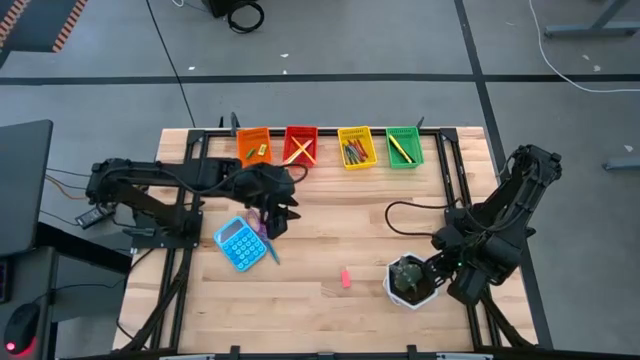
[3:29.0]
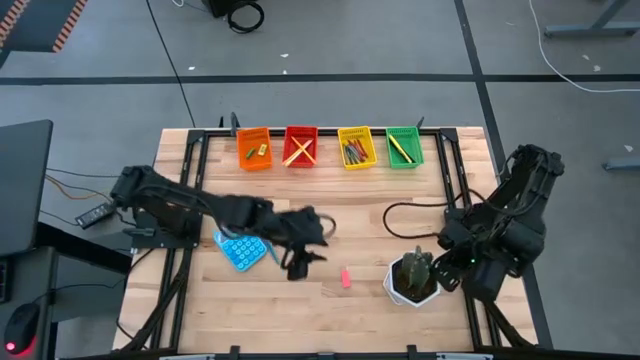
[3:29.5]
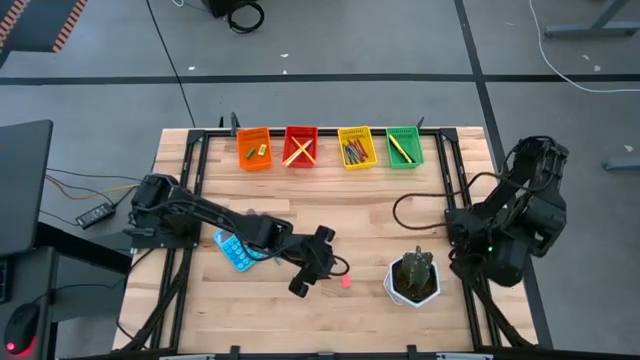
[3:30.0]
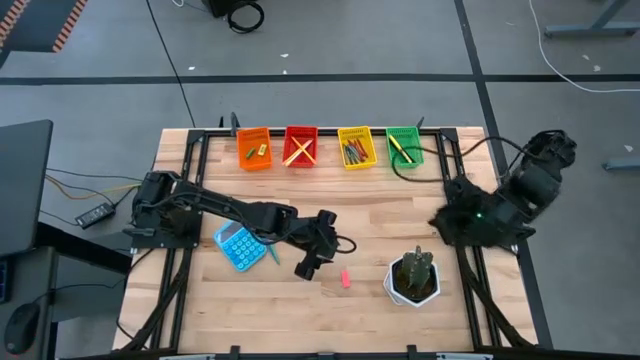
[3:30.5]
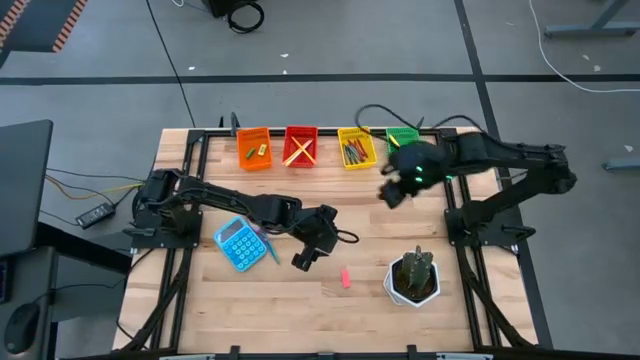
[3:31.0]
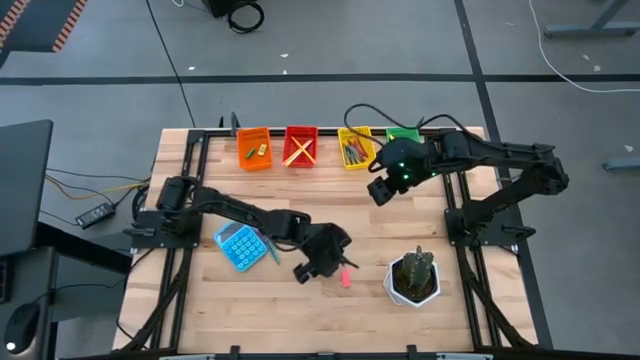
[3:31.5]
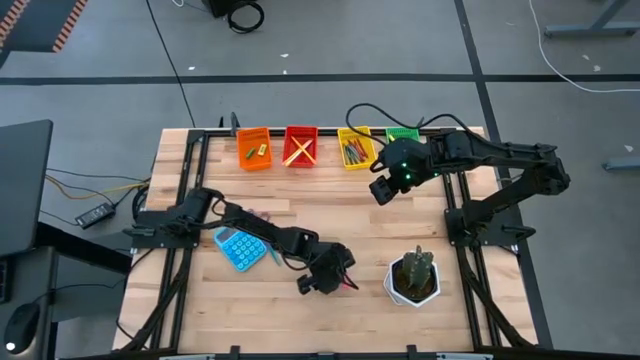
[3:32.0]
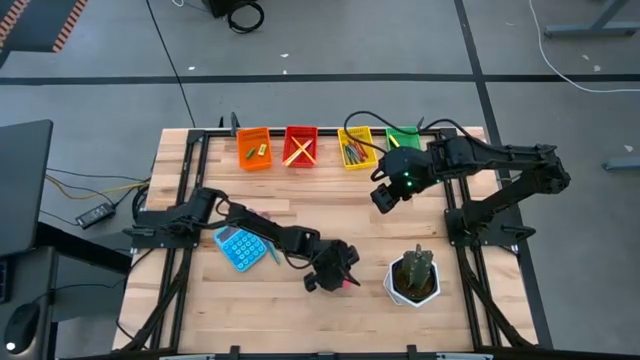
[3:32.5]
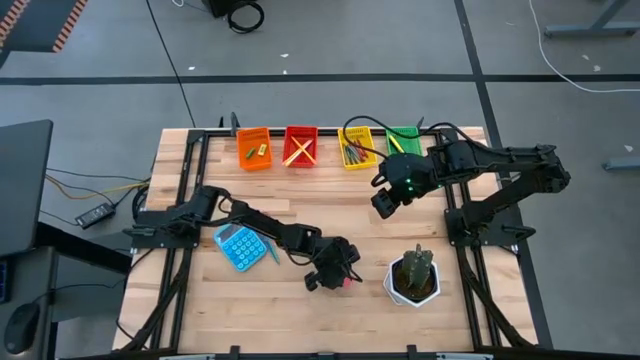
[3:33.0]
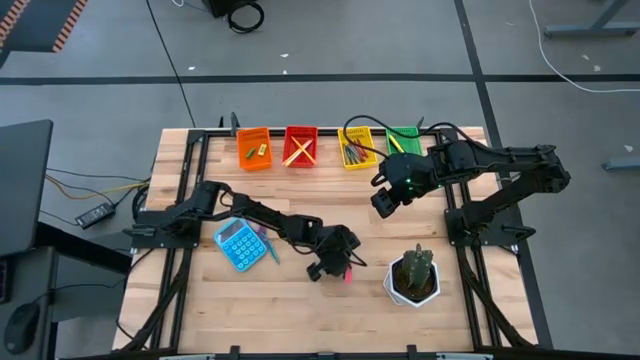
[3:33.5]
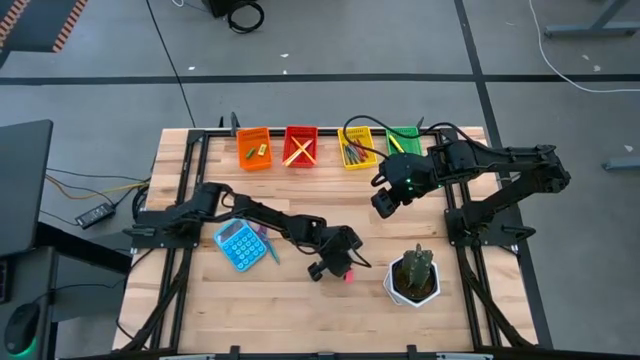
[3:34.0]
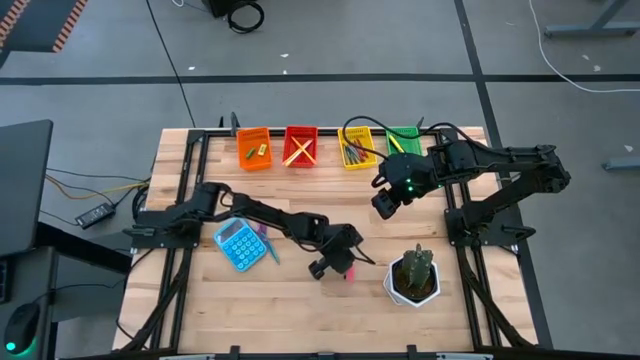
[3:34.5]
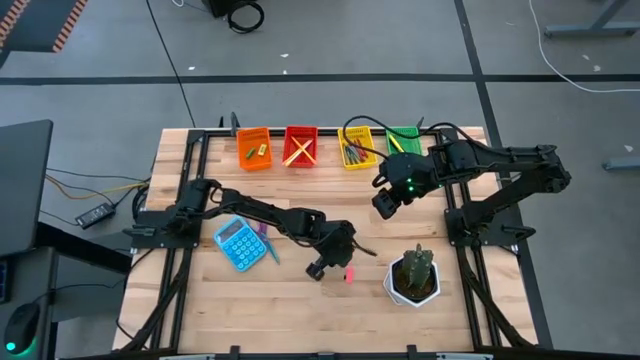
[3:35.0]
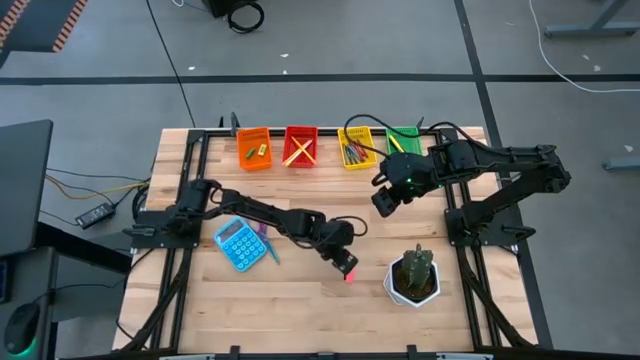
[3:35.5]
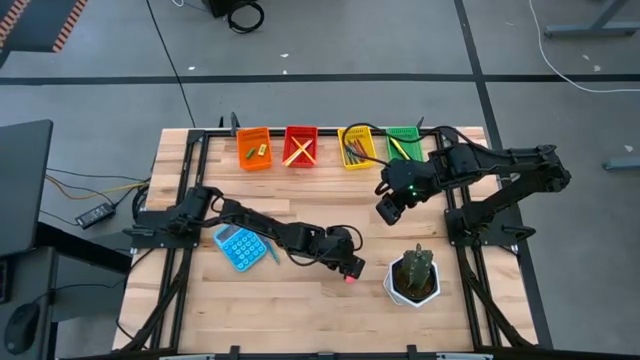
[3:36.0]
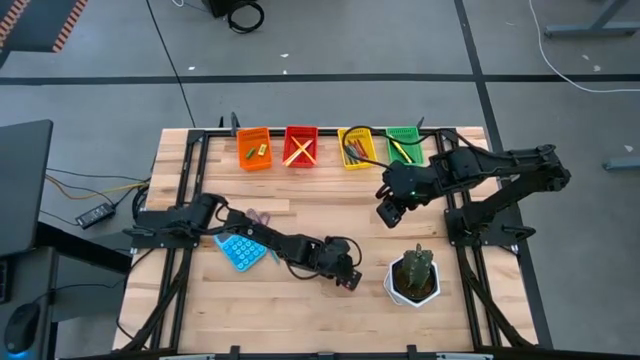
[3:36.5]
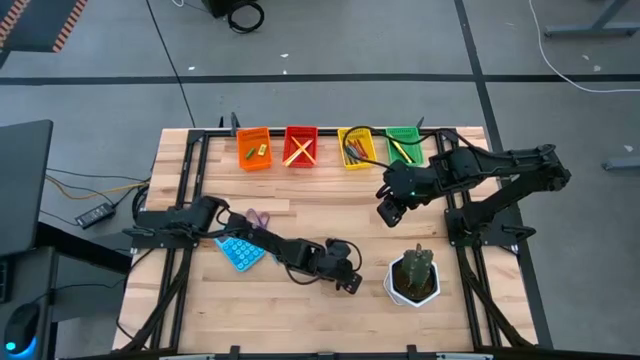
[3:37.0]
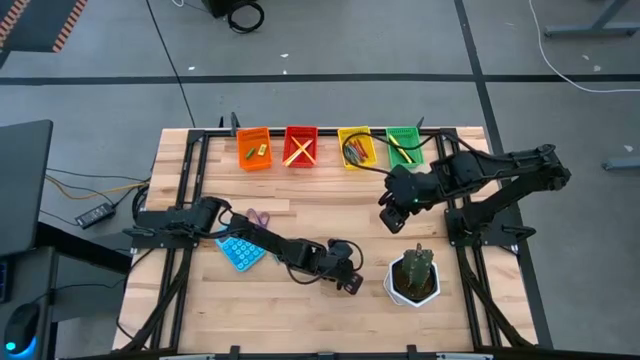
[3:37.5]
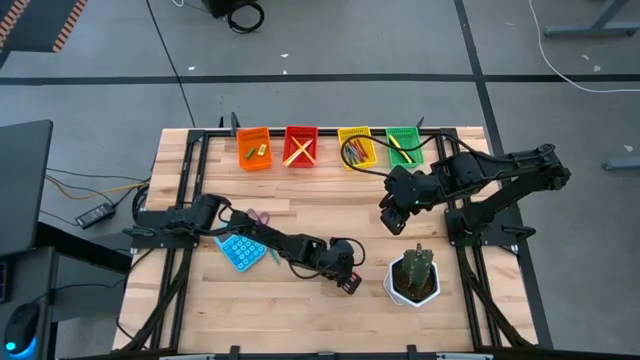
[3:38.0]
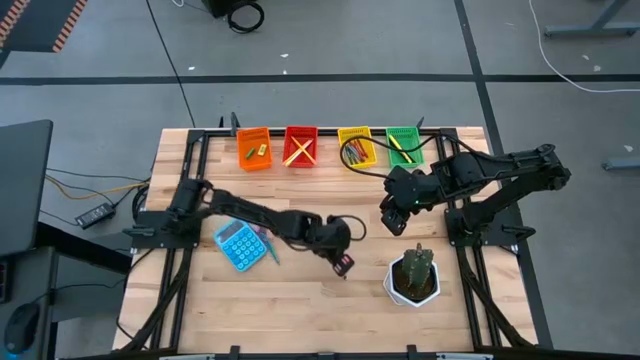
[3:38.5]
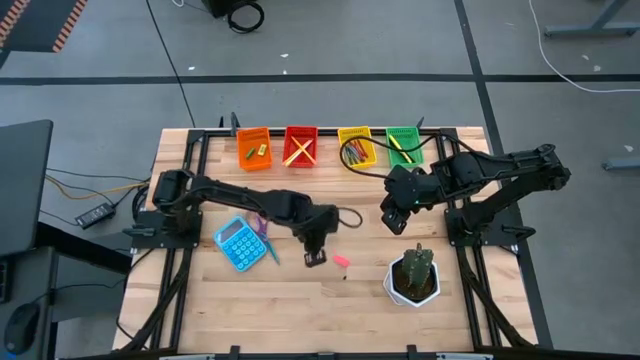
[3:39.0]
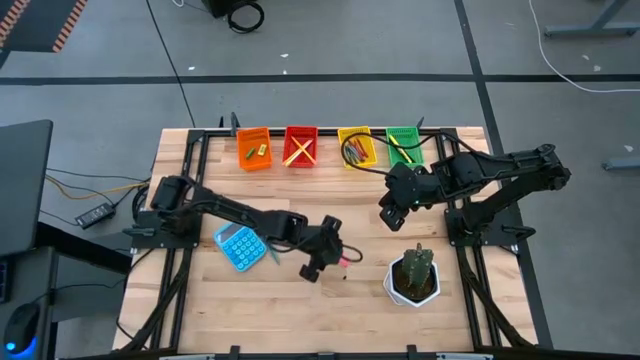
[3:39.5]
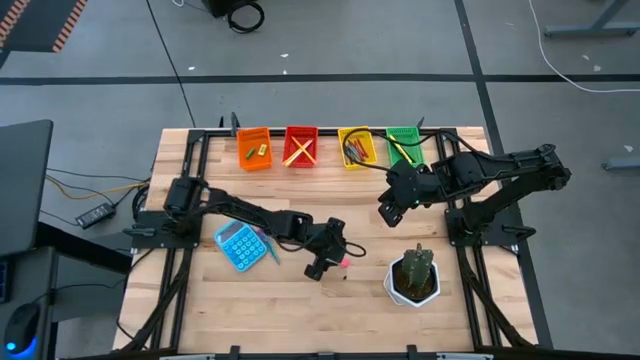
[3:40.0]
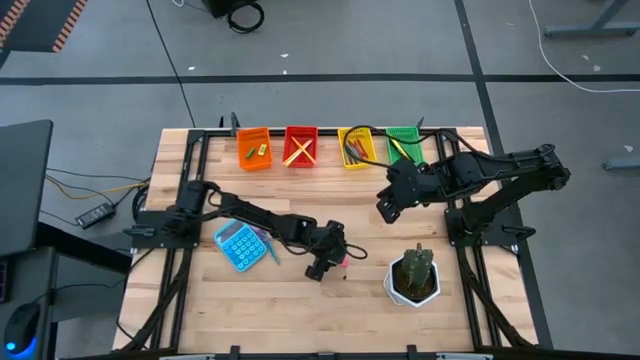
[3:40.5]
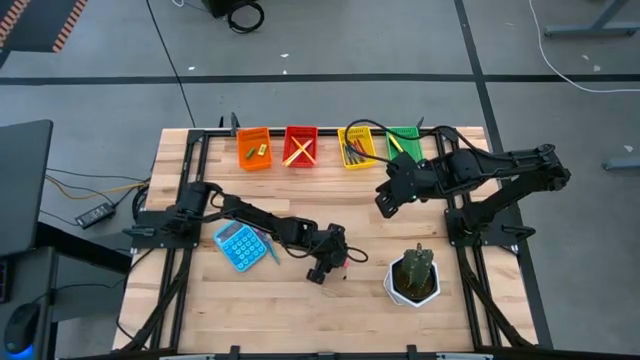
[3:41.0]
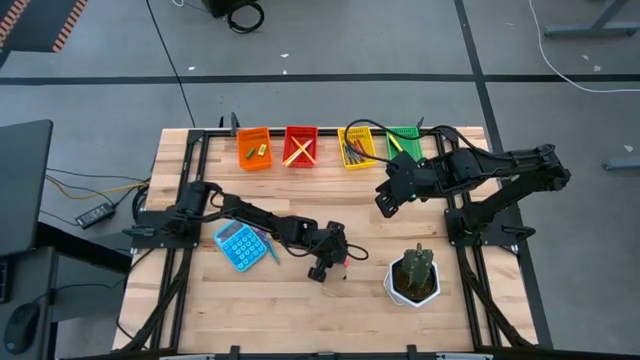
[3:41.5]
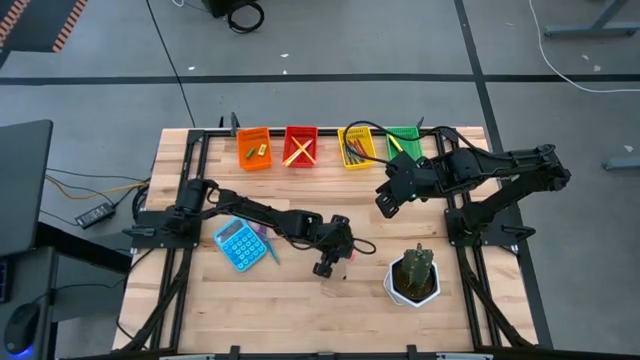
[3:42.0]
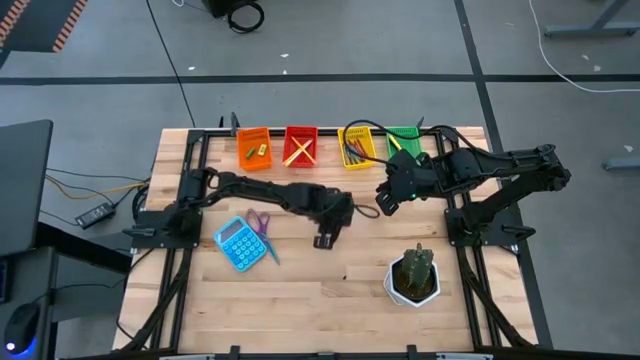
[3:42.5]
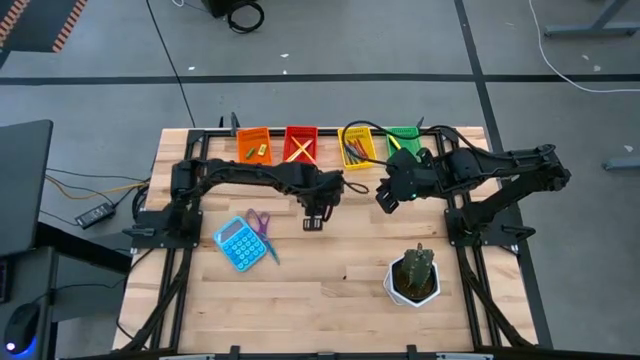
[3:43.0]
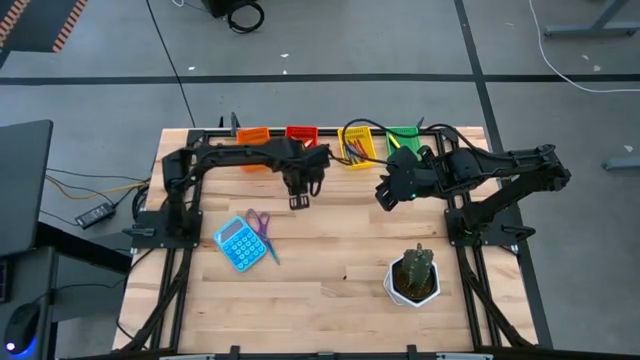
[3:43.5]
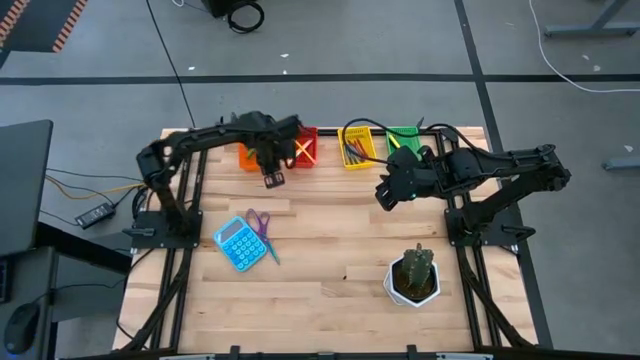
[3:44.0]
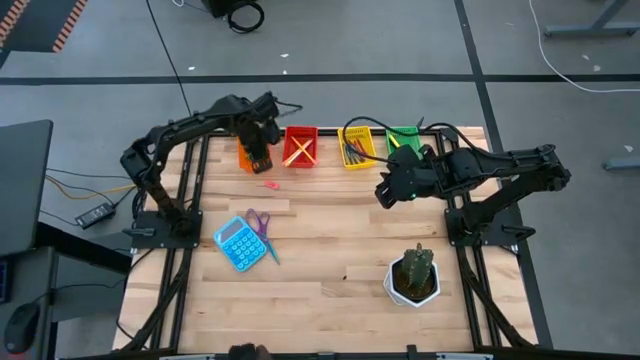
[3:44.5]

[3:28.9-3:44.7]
Task: Sort crayons/erasers/pens/pencils in bins
Put the pink eraser into the orange bin

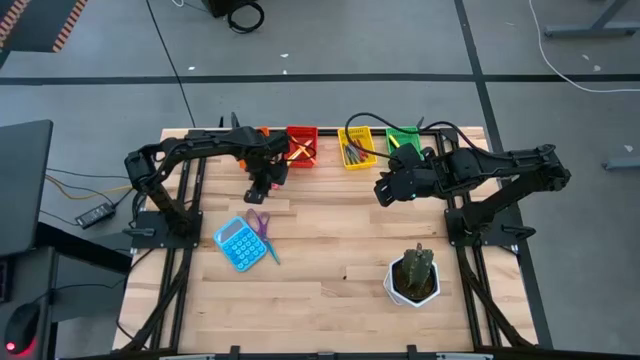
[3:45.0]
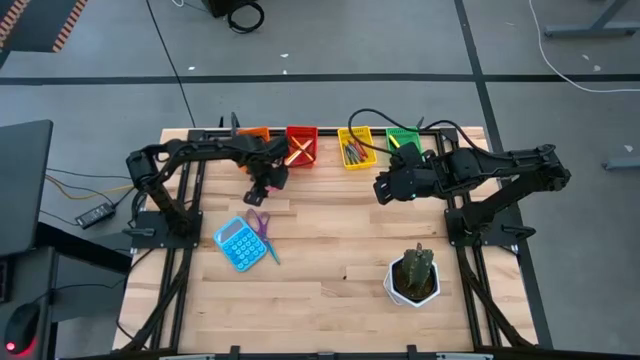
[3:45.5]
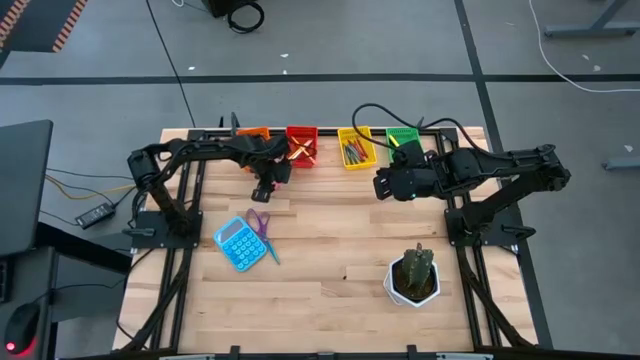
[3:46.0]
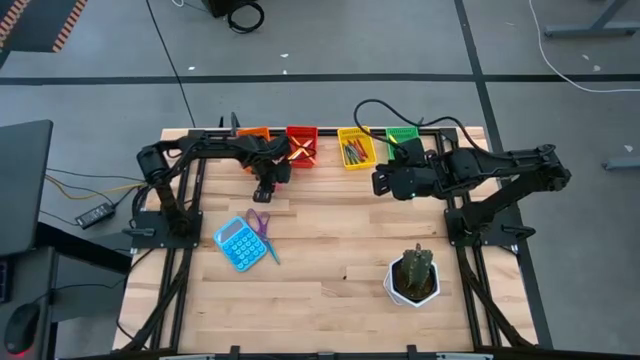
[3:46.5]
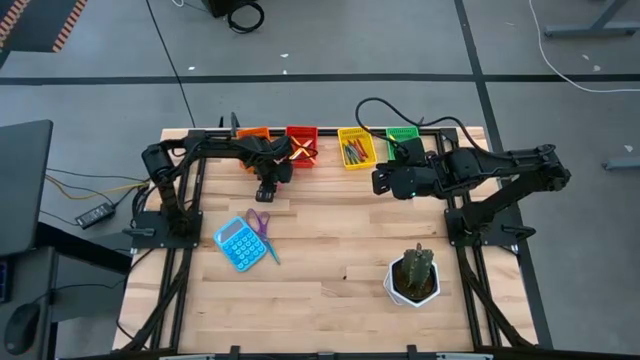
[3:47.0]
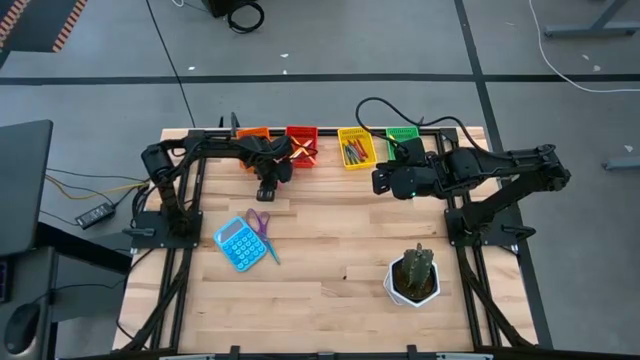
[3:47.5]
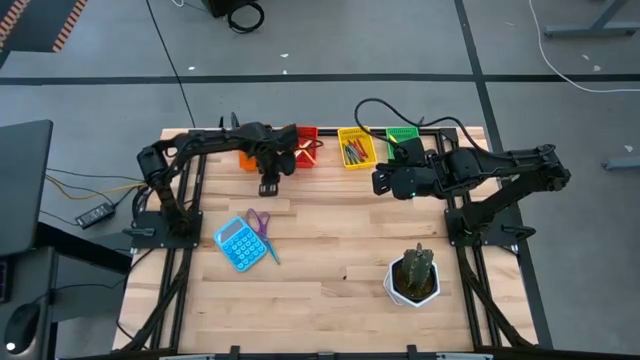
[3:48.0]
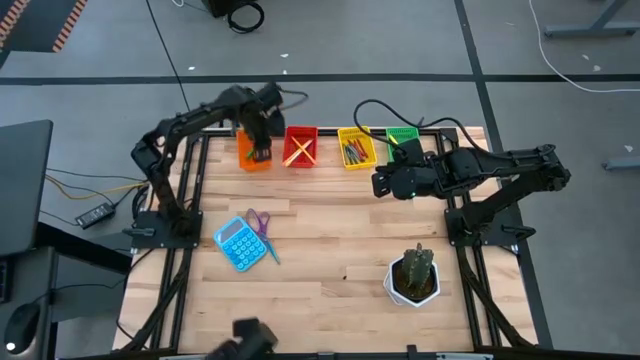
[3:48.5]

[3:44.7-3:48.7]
Put the pink eraser into the orange basket
